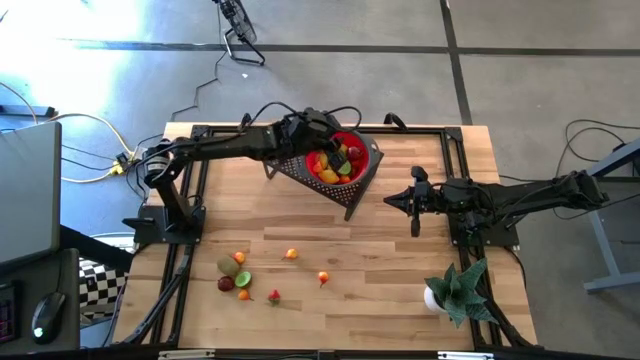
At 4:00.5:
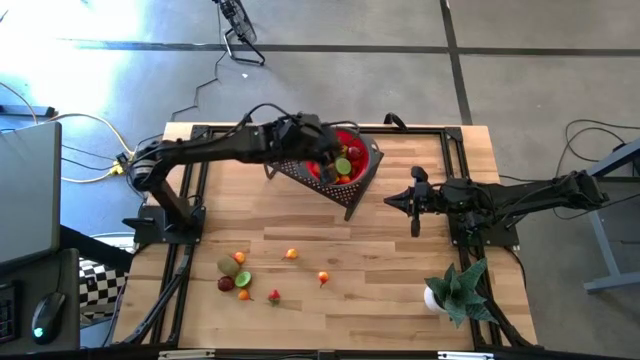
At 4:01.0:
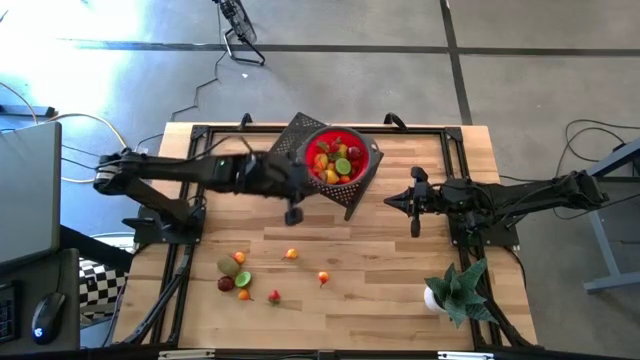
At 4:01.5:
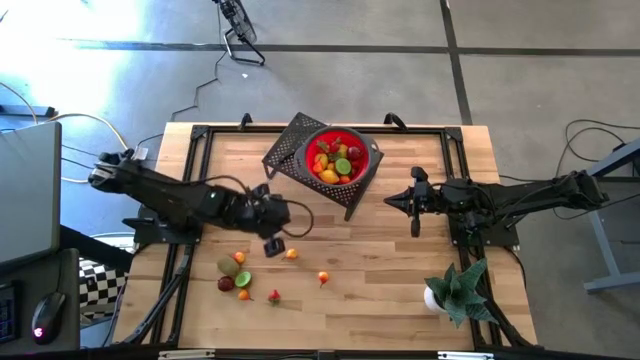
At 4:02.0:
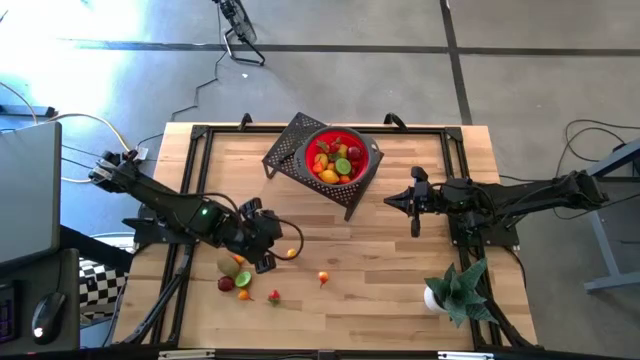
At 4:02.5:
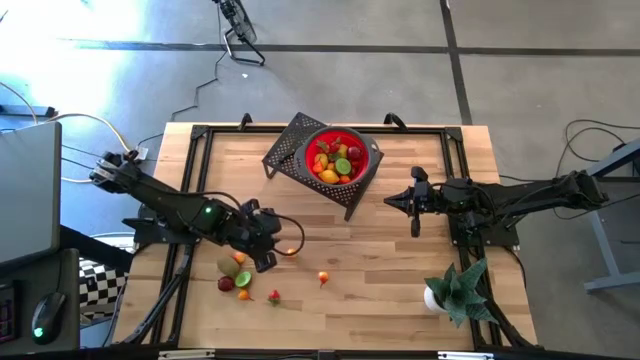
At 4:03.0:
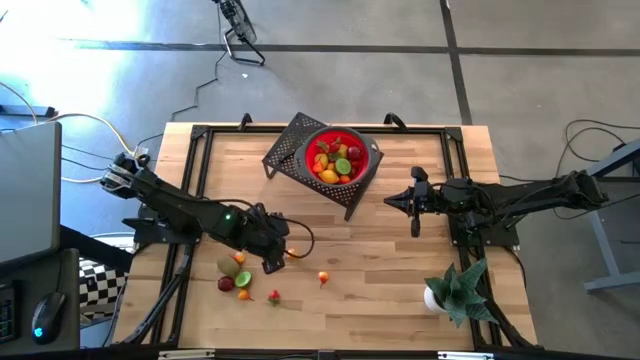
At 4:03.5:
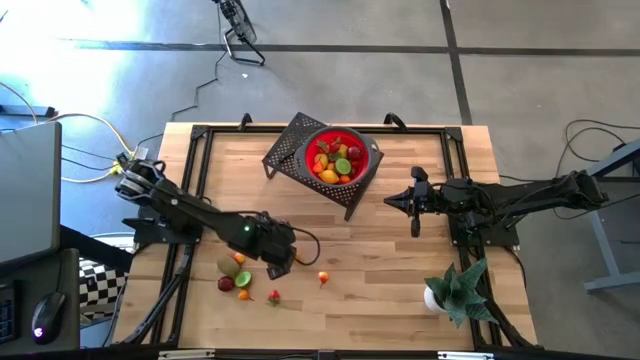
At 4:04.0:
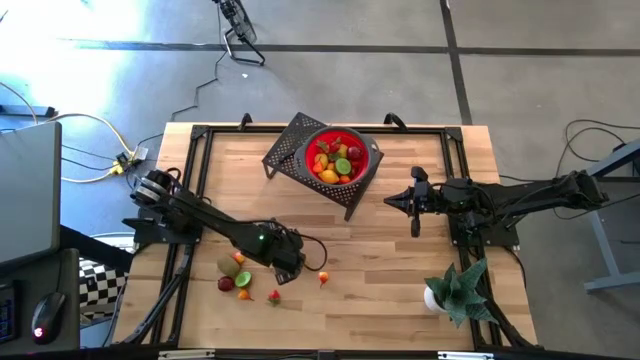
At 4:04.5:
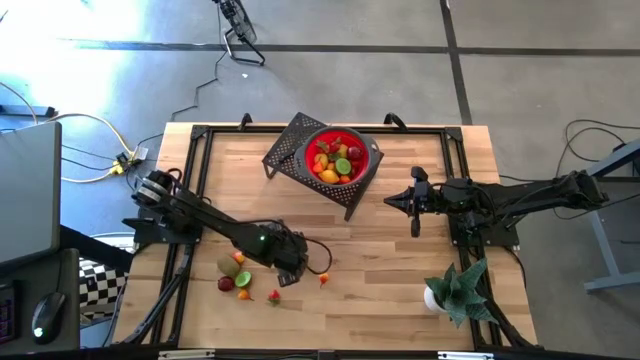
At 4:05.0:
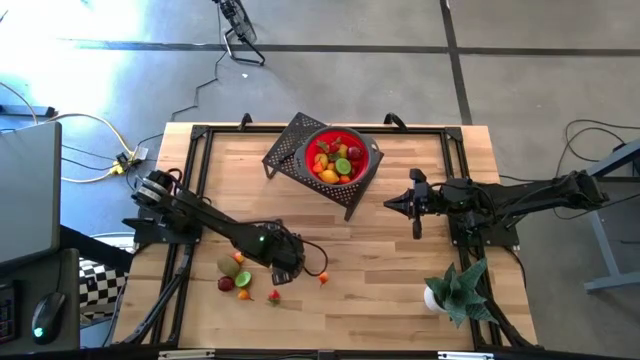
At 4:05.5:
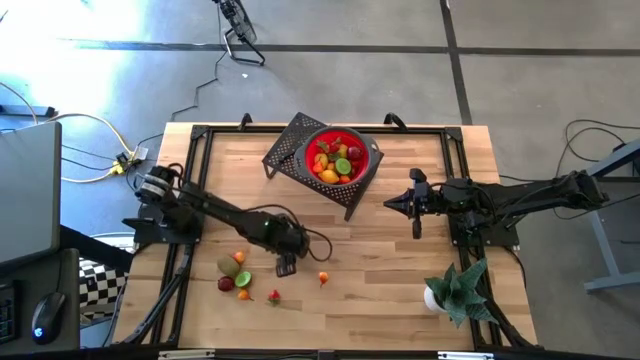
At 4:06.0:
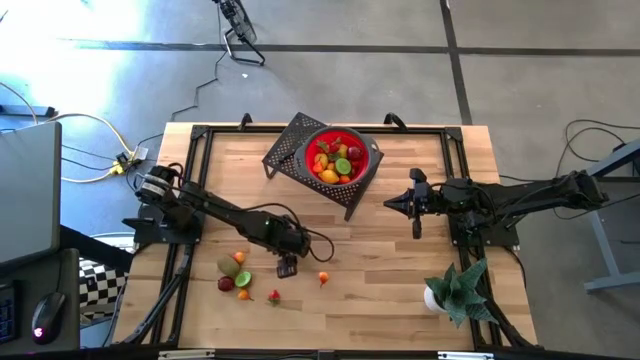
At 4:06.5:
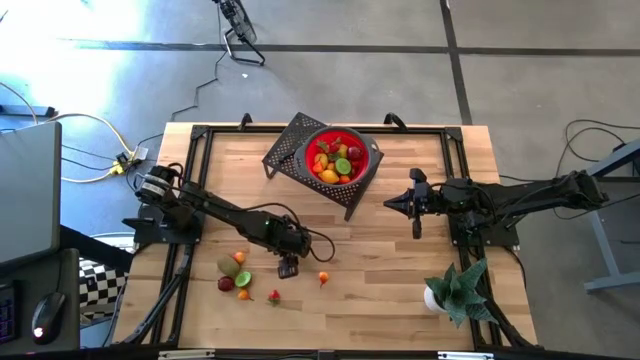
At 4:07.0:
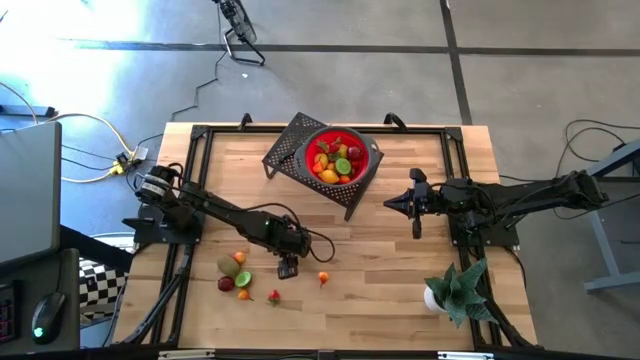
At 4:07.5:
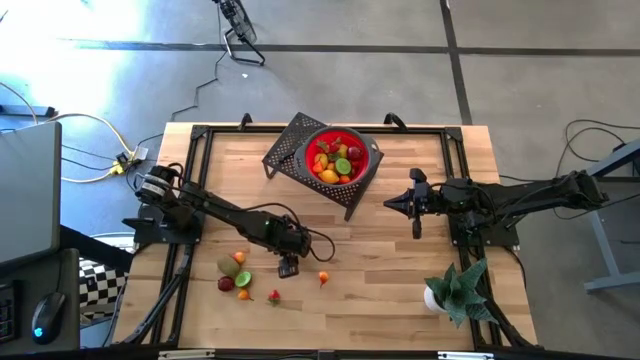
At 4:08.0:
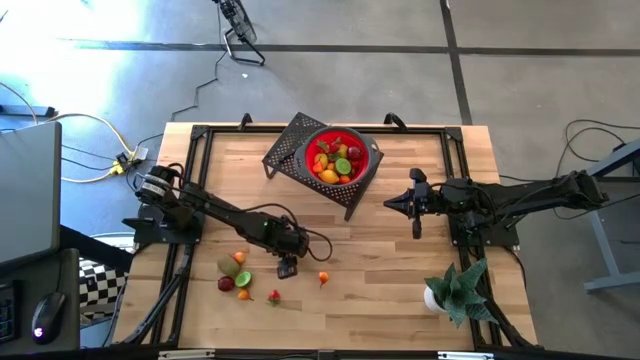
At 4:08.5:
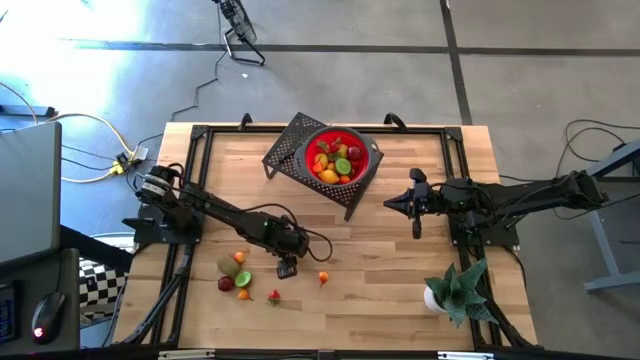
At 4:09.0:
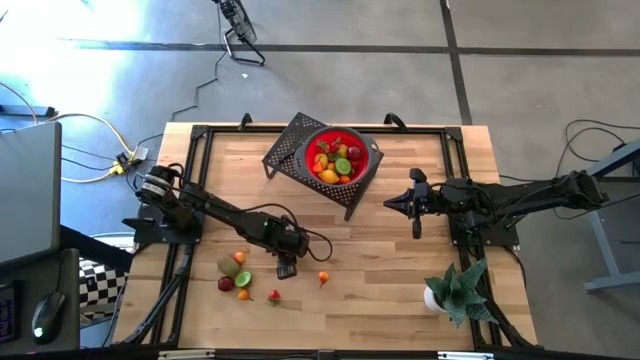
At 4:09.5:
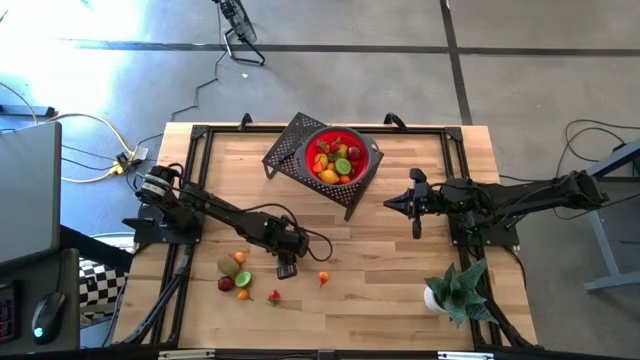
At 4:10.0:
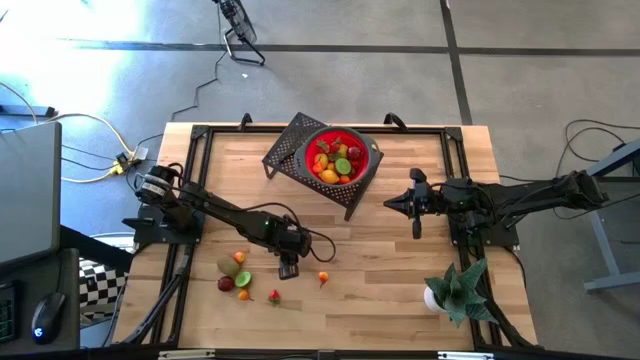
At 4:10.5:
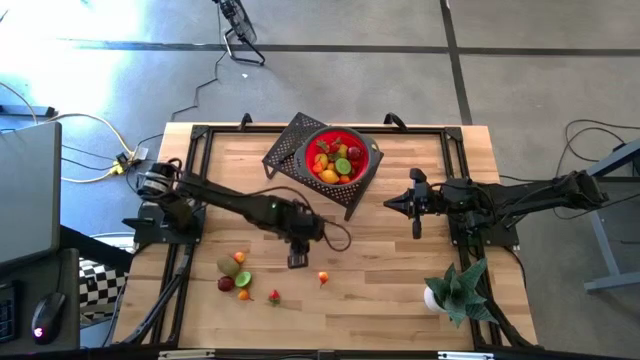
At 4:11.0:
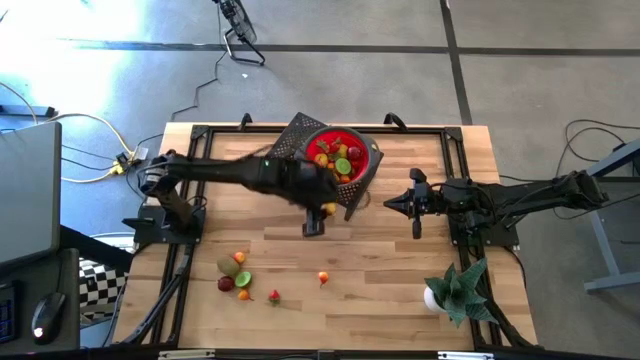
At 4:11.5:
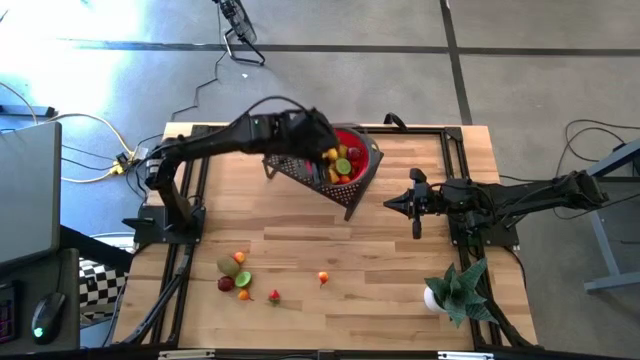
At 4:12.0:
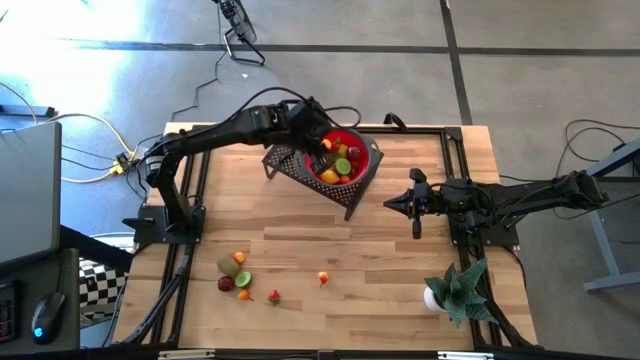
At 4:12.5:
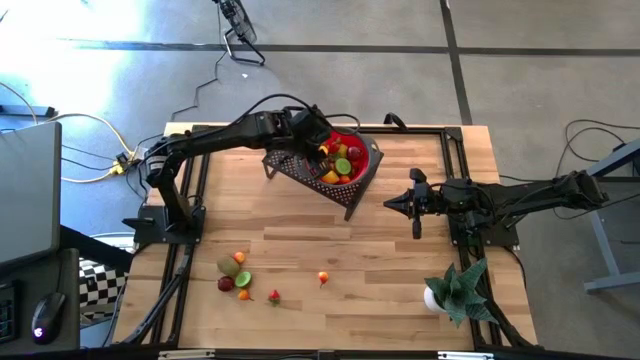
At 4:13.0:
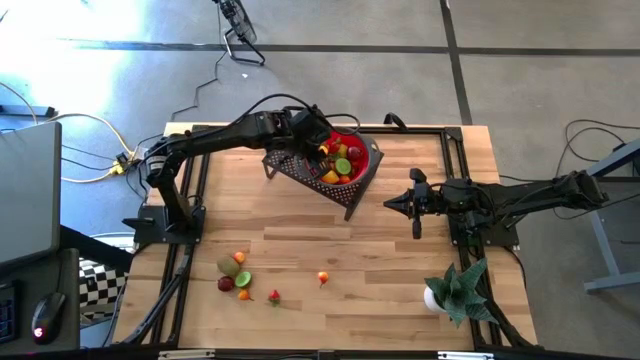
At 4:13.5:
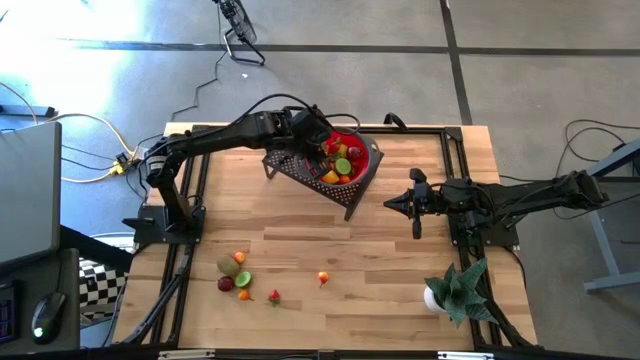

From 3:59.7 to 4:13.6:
Task: Pick & Place Fruit
Put the pear into the strainer bowl on the shelf

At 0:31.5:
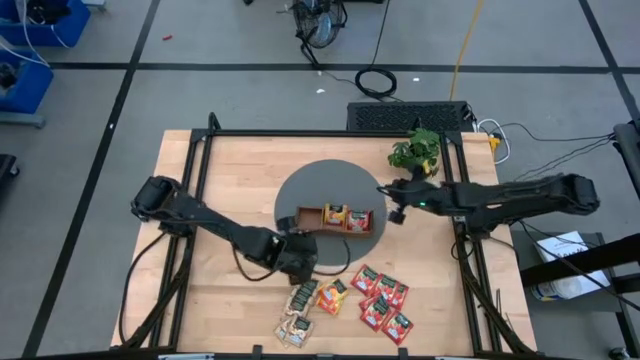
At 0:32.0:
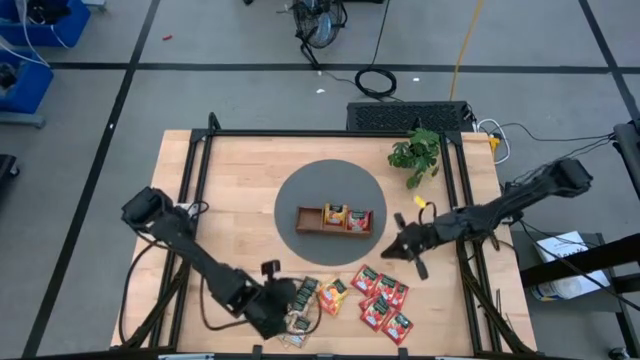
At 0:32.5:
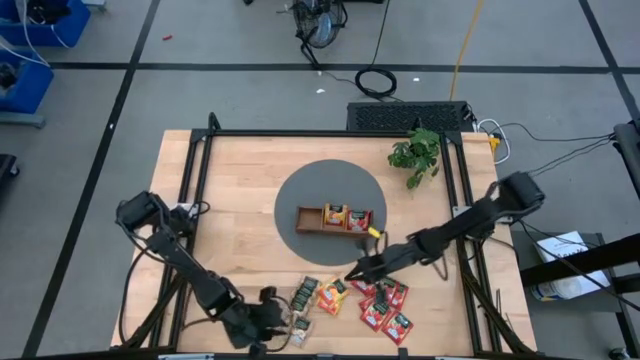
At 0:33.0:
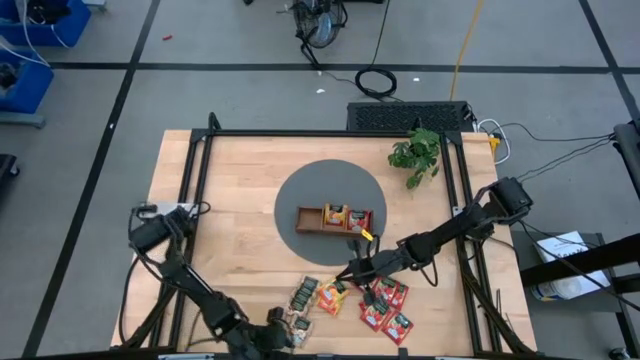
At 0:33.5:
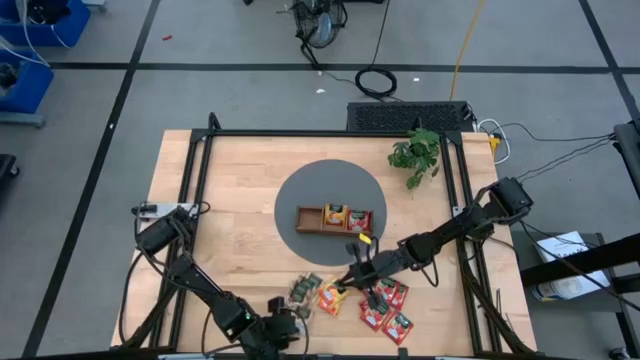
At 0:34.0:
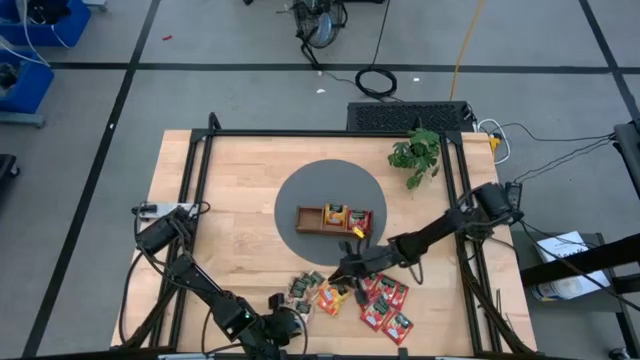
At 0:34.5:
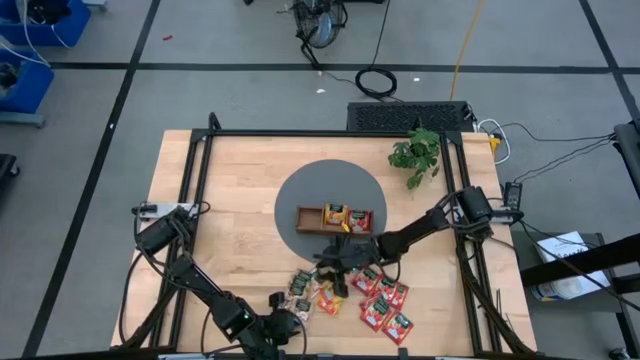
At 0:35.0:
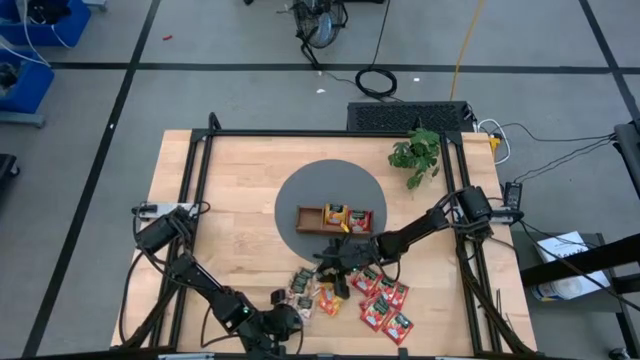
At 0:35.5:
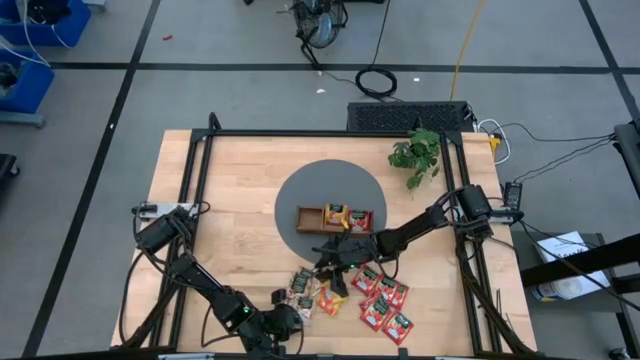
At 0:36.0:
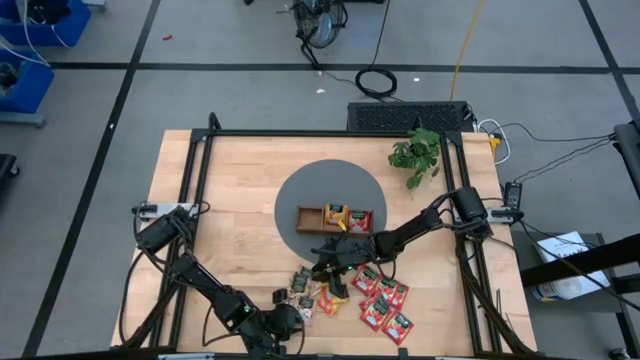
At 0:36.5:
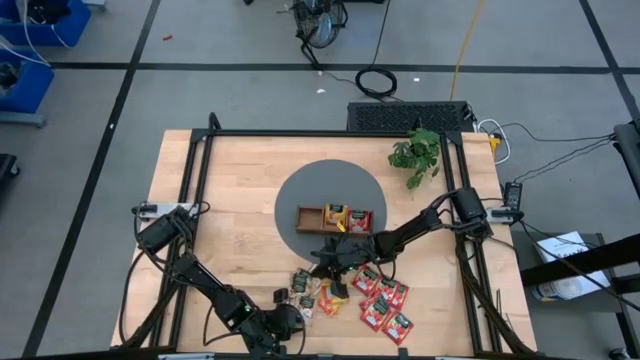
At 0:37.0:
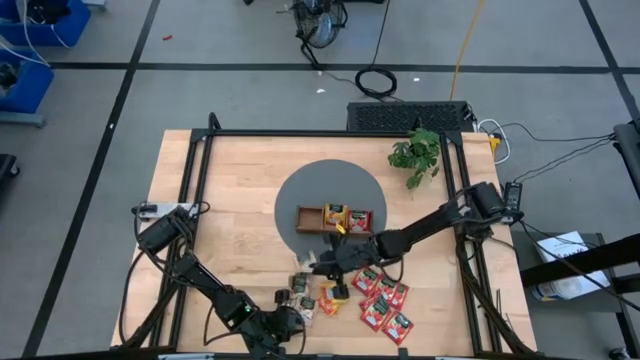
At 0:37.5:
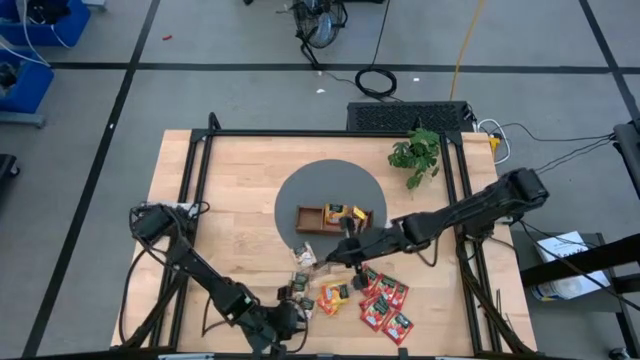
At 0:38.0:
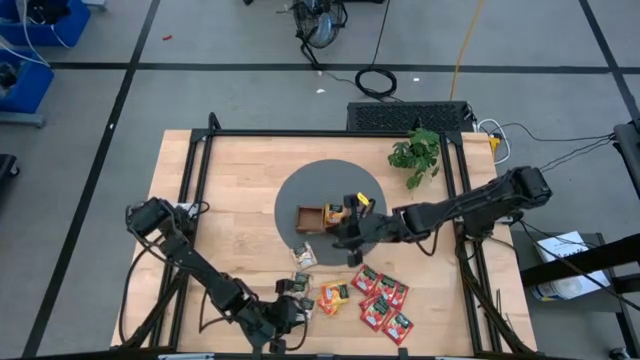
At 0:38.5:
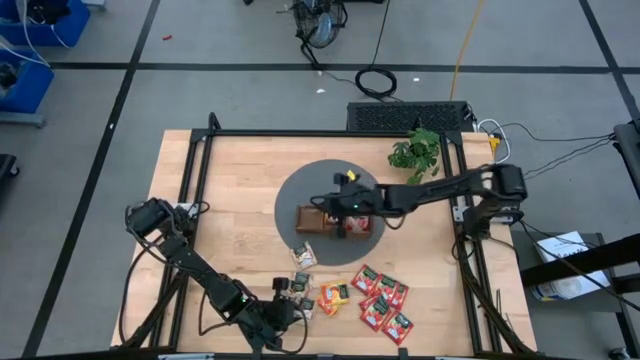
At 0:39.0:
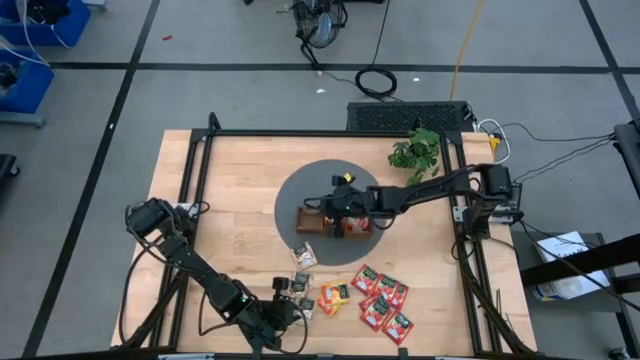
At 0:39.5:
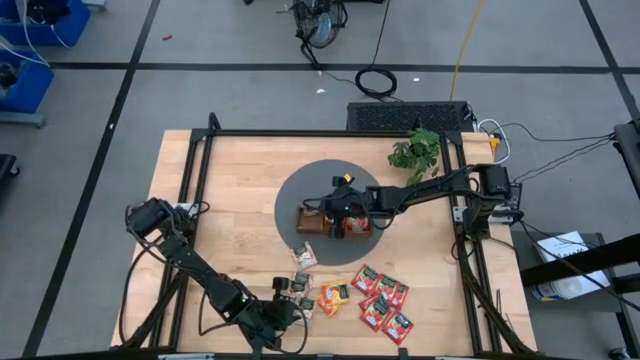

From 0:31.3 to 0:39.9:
Task: Pick & Place Tea
Put the brown tea bag into the left section of the wooden organizer
